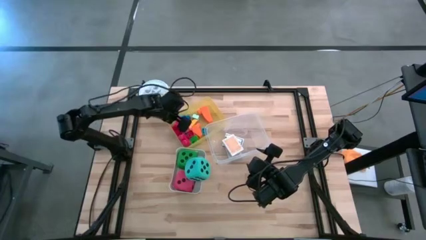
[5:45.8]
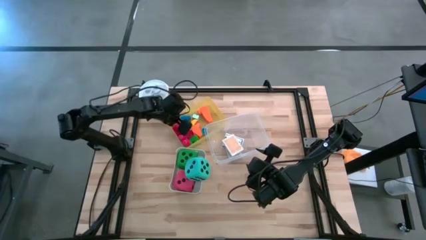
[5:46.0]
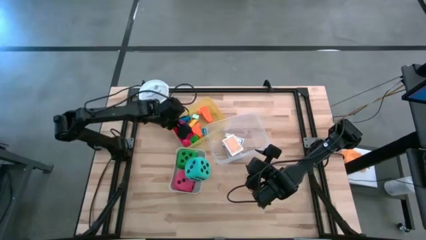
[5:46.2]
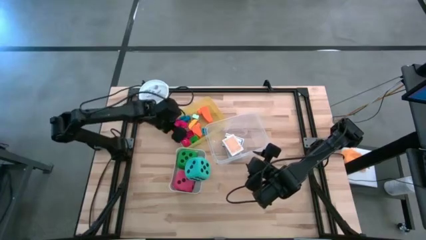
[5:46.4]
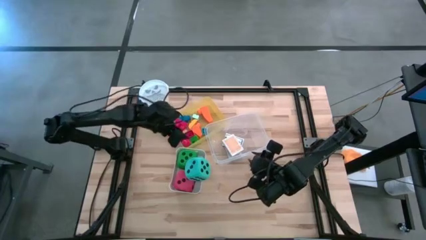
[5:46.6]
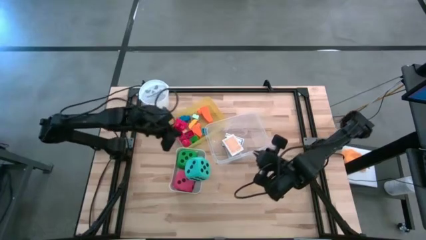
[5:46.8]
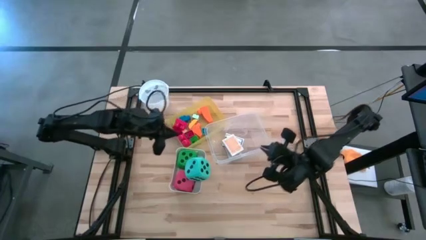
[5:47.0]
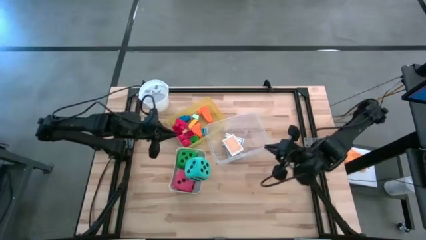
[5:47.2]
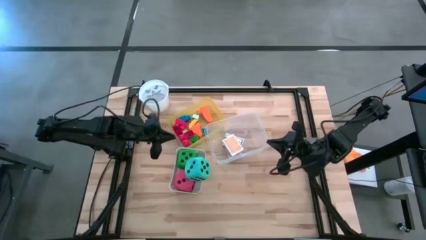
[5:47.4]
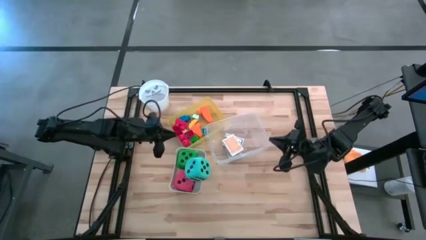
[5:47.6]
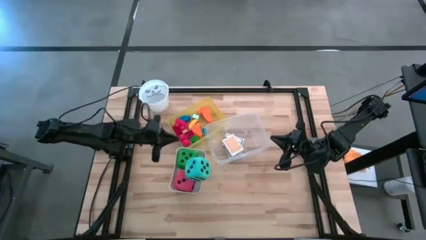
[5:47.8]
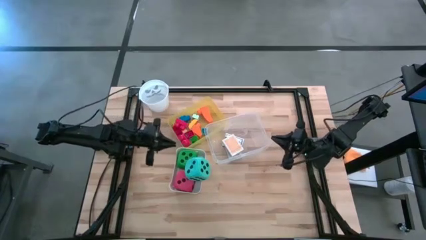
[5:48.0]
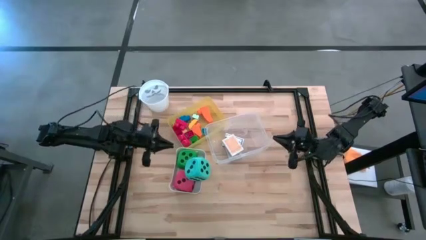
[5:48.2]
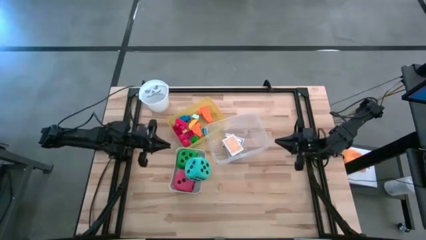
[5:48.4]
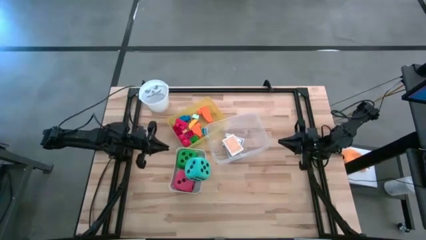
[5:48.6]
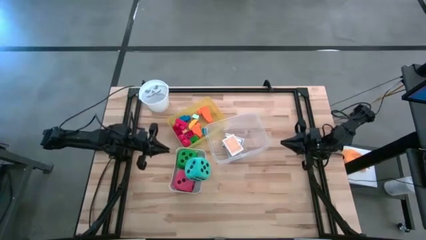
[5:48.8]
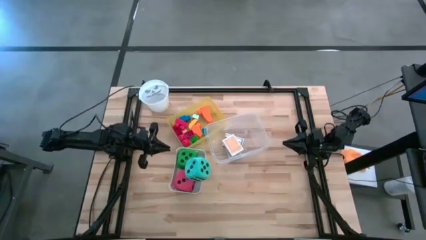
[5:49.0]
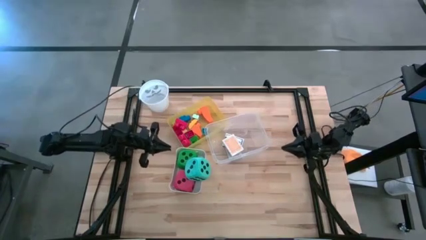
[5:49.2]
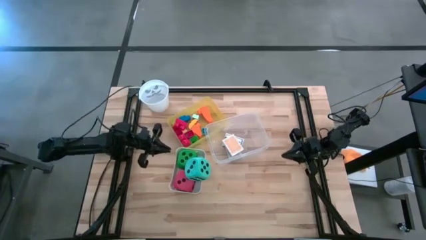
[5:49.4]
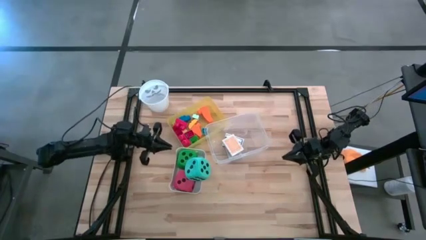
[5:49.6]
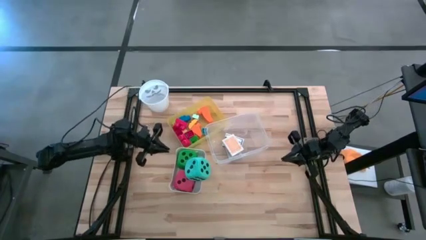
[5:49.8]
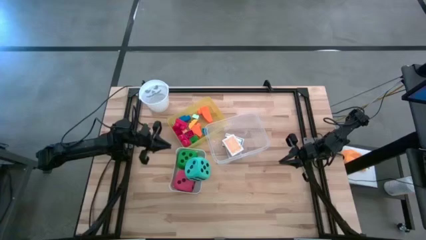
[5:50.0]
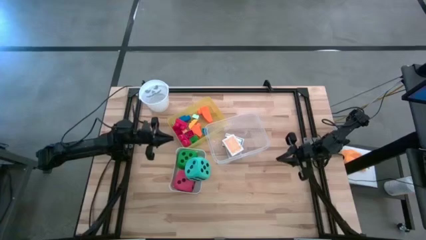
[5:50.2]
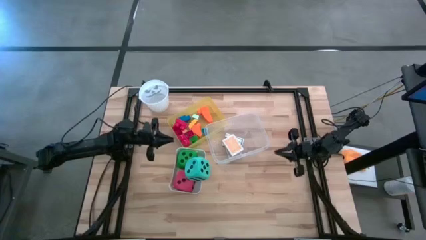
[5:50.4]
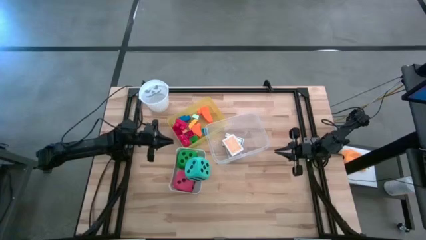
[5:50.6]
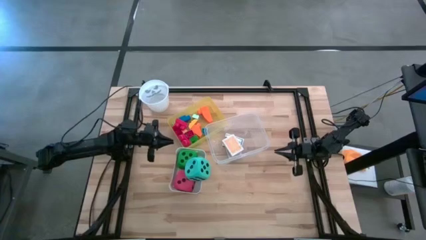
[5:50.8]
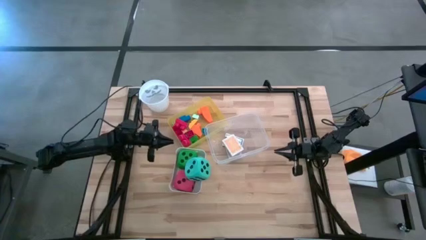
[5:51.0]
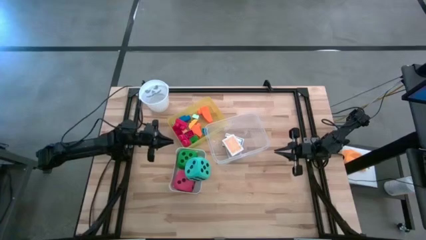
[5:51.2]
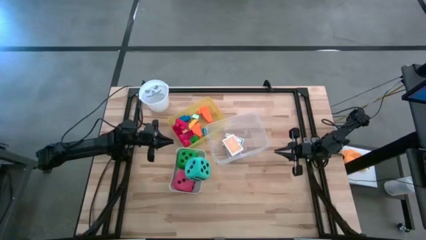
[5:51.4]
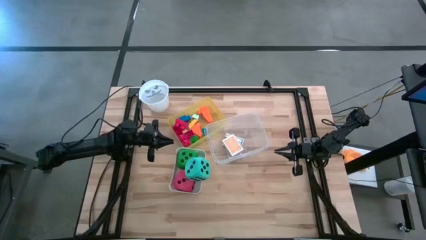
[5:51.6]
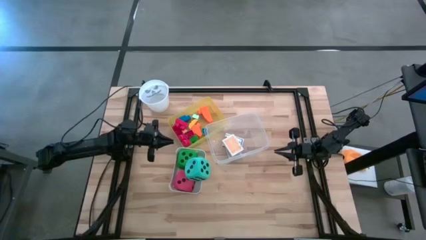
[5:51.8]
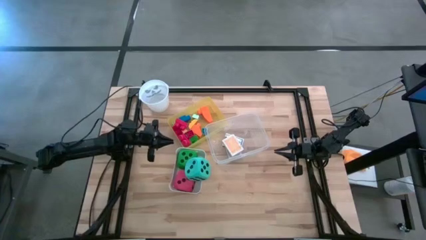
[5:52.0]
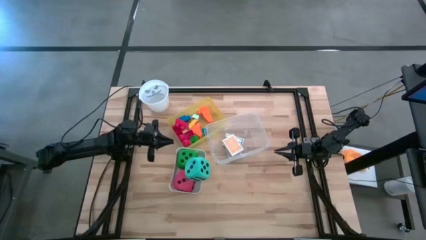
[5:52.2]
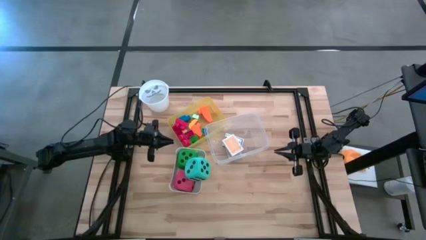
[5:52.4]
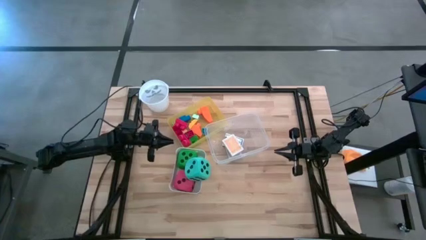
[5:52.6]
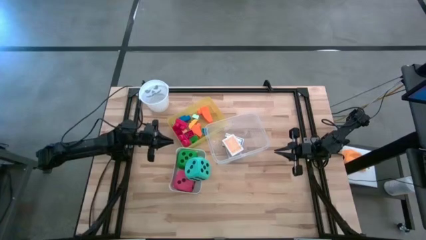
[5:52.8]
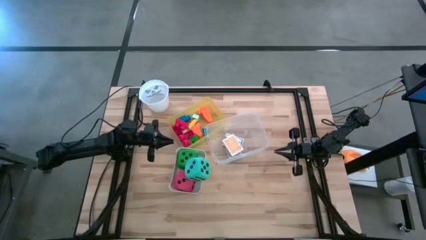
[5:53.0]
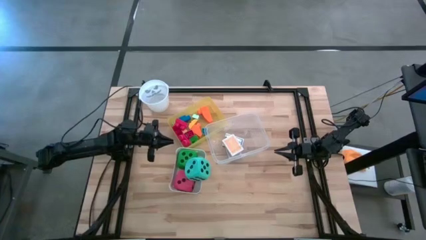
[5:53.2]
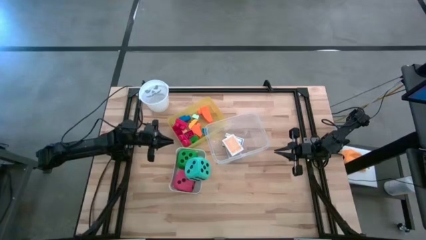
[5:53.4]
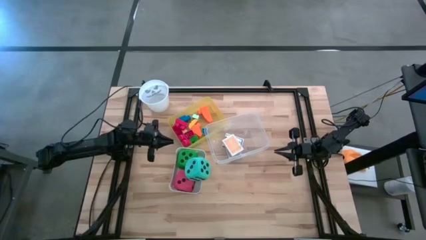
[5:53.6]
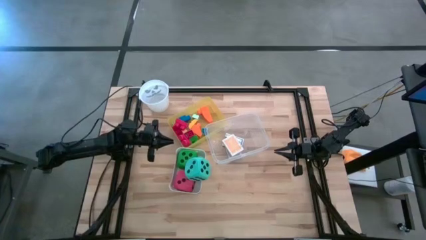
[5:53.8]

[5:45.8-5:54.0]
Task: Pick & Place Toys
Return to Home Position

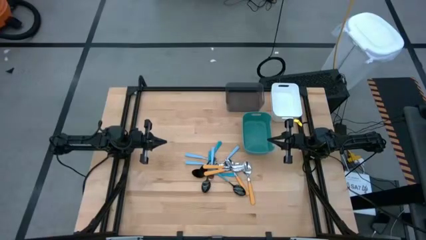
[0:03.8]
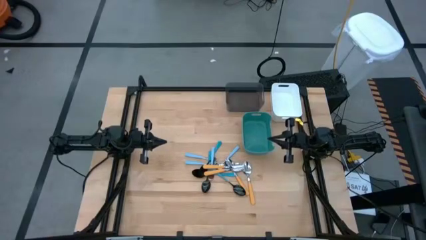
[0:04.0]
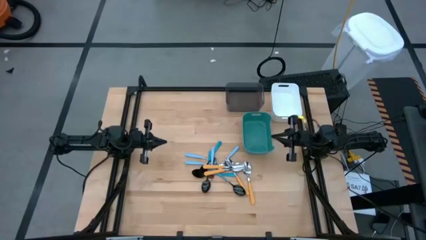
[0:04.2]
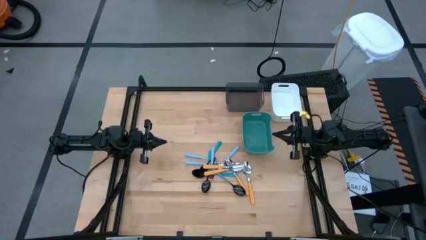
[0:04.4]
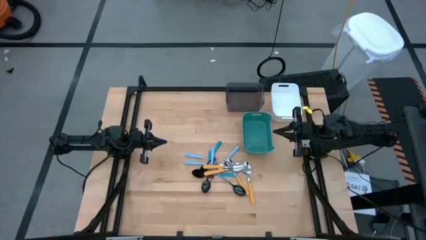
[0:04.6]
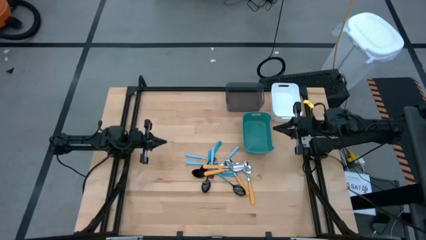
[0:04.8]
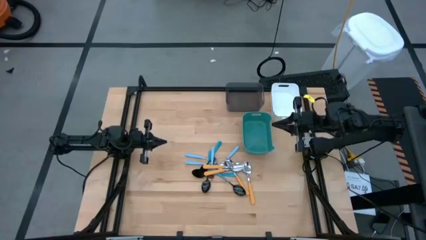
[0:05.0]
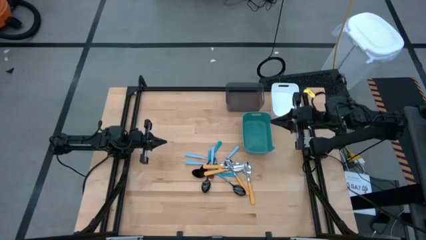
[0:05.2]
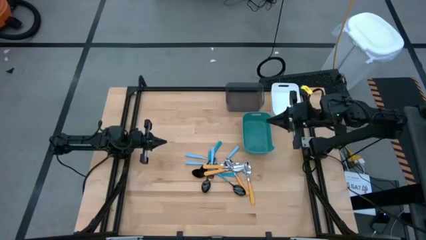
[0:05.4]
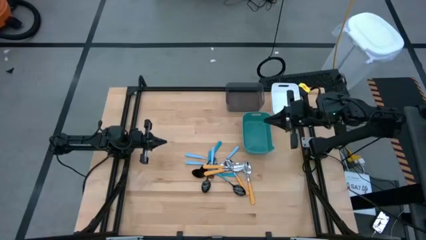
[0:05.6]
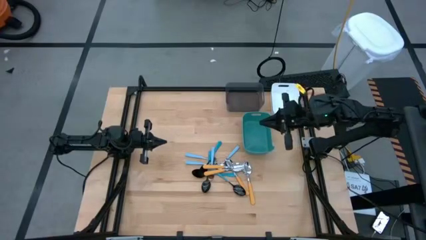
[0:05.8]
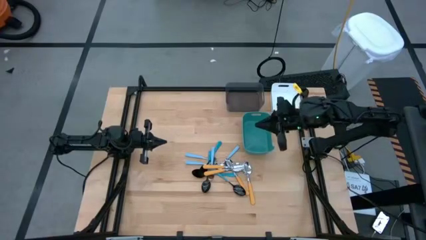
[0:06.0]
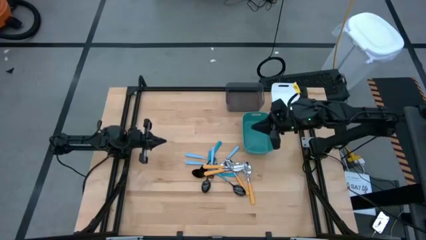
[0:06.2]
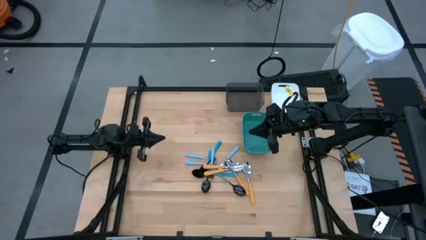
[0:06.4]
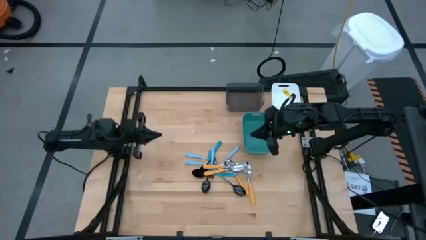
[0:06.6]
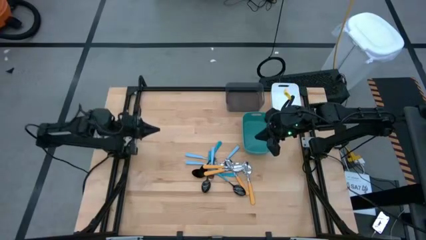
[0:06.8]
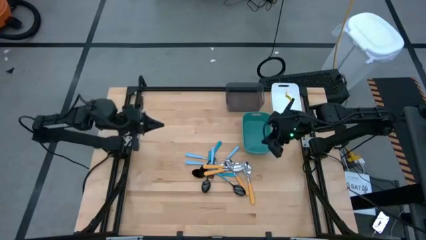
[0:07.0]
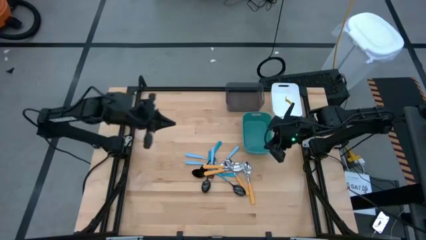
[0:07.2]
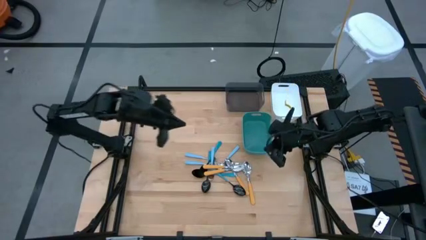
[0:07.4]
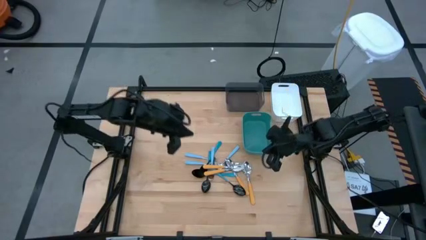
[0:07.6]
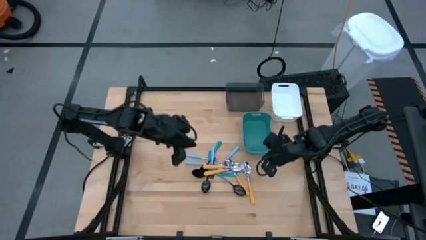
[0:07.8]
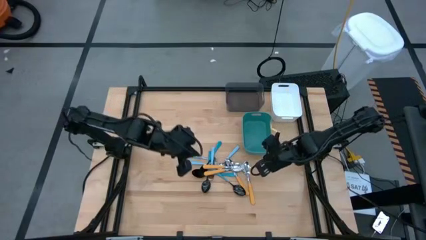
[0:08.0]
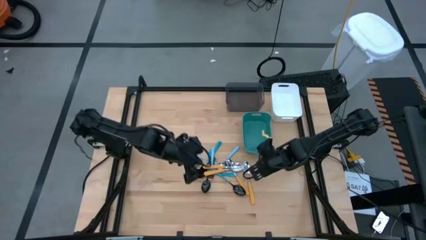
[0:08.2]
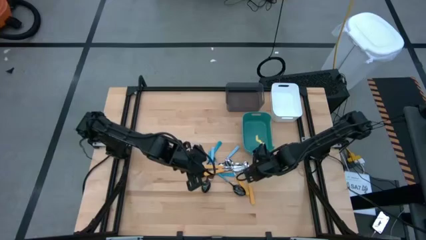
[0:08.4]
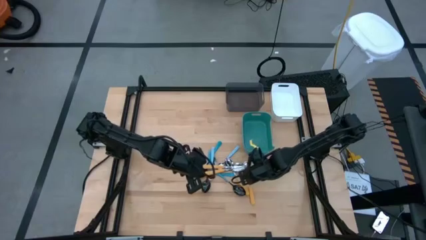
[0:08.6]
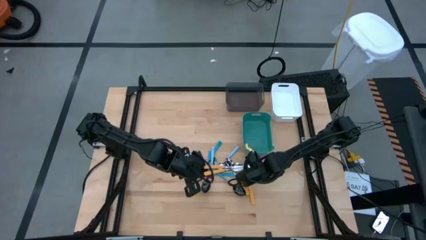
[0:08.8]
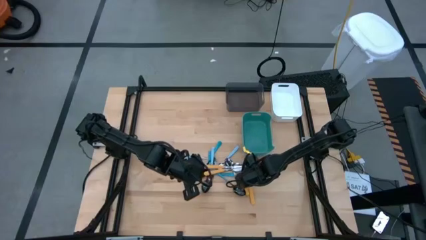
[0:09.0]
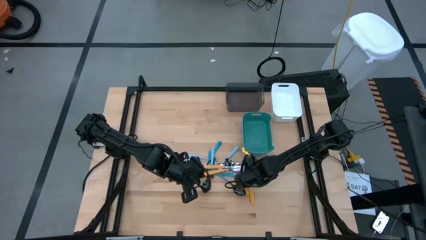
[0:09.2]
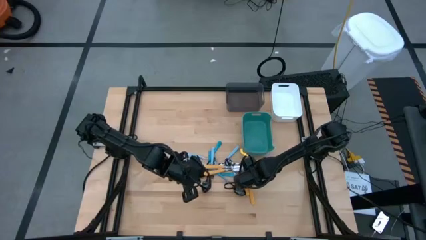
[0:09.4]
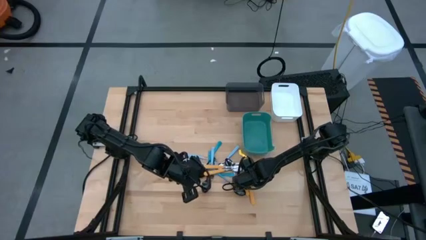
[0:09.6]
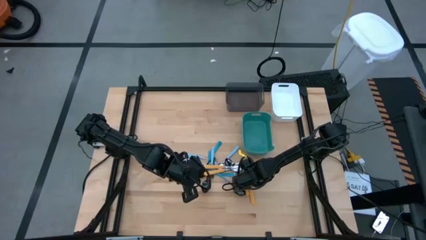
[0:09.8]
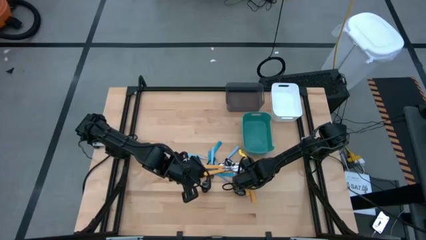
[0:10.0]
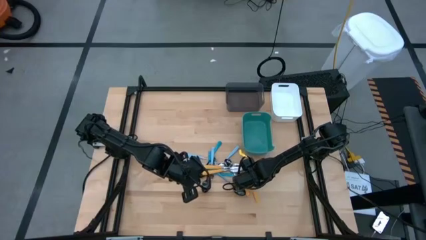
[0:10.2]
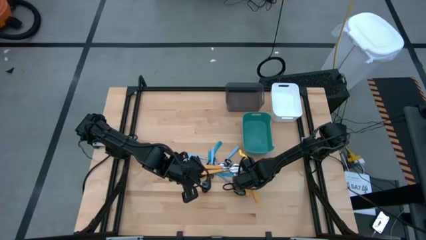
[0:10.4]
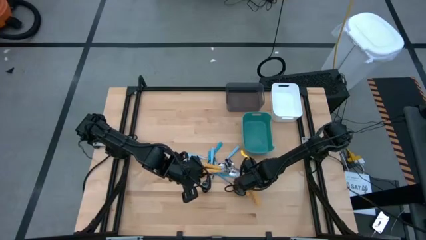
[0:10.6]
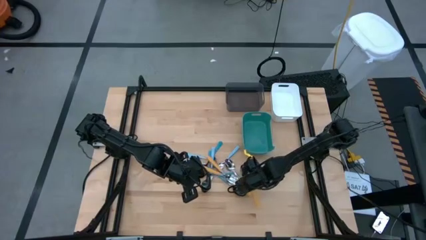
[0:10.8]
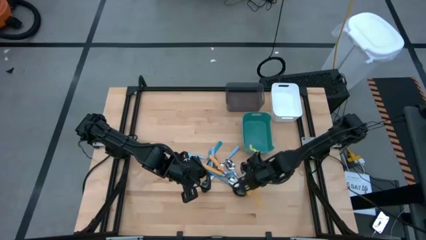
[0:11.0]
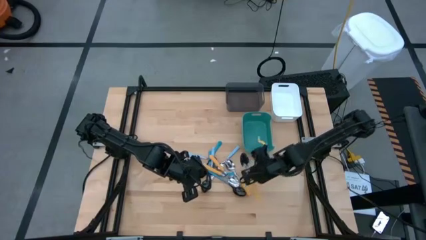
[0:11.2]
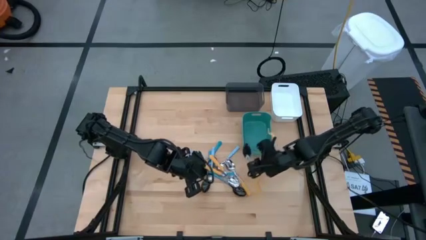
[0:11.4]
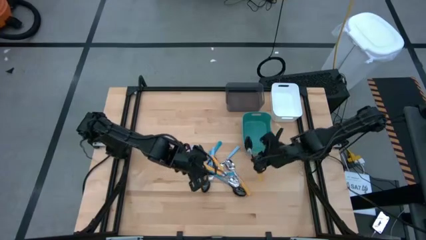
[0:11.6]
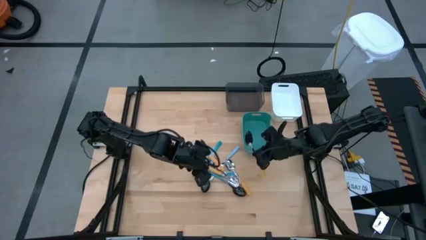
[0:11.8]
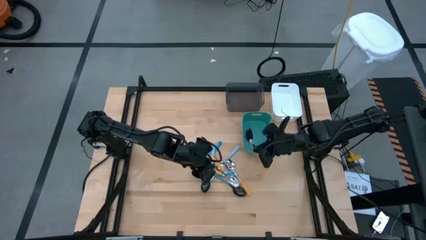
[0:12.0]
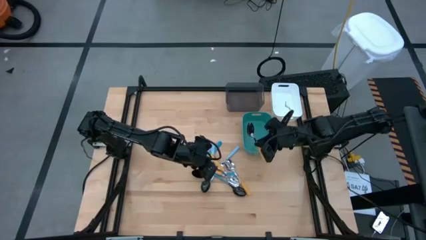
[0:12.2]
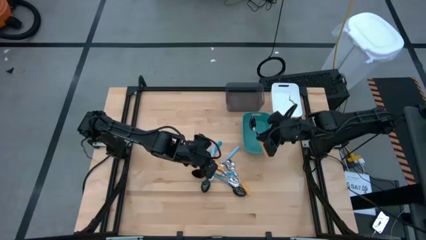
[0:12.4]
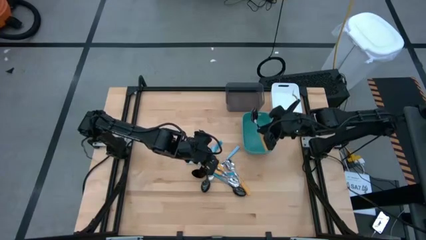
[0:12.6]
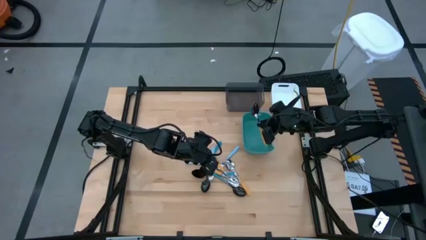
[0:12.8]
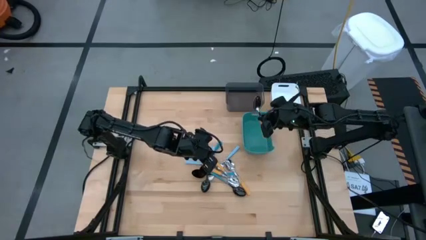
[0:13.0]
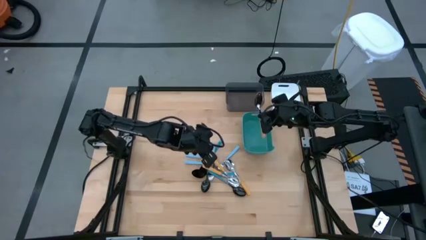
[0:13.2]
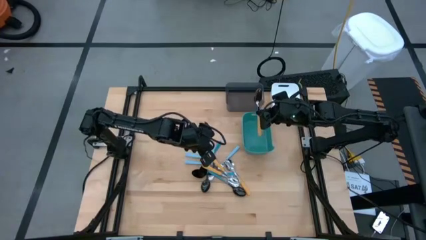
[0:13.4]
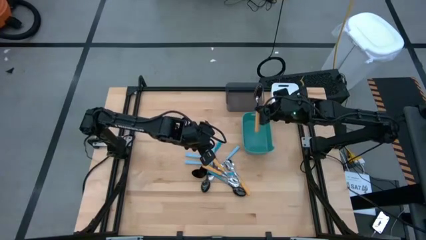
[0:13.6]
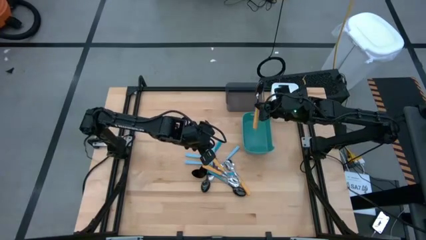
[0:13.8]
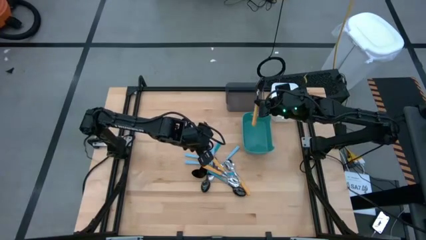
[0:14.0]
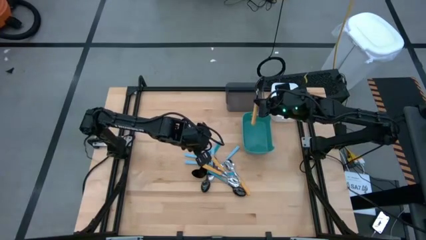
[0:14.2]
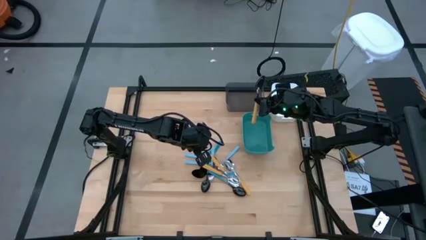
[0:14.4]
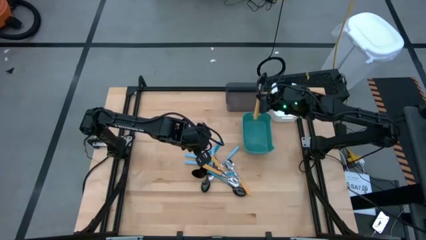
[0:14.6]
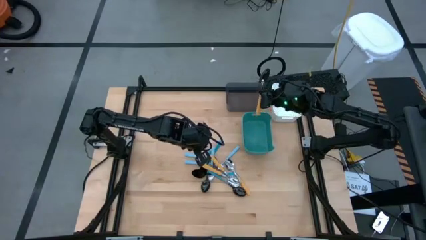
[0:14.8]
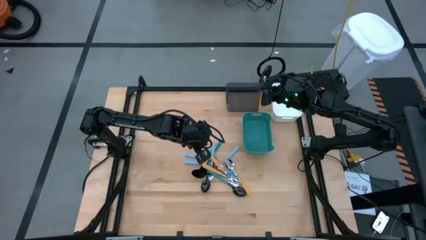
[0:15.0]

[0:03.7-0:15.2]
Task: Sort silverware by color (type)
Put the orange spoon into the black bin
